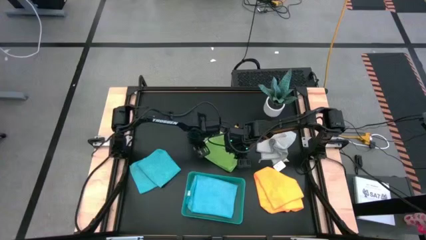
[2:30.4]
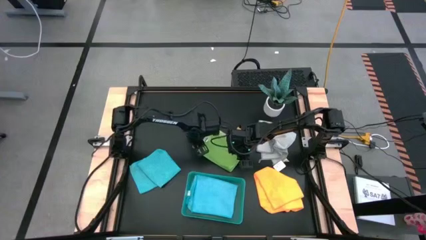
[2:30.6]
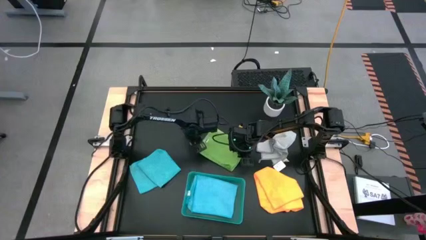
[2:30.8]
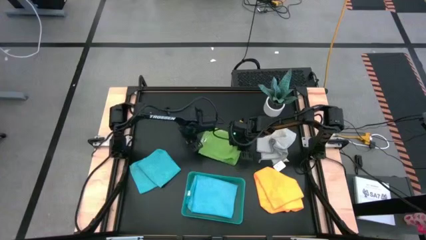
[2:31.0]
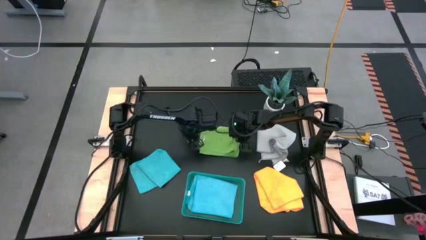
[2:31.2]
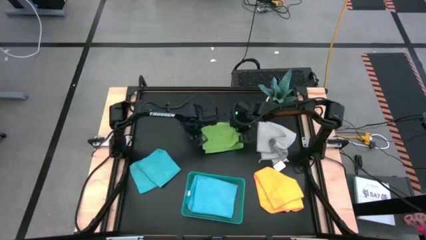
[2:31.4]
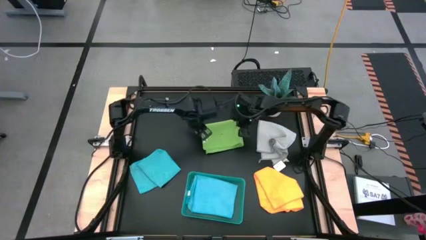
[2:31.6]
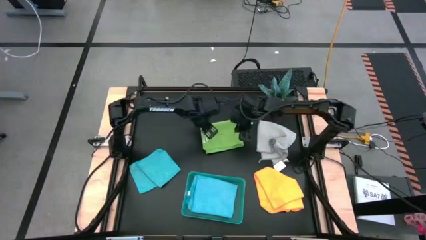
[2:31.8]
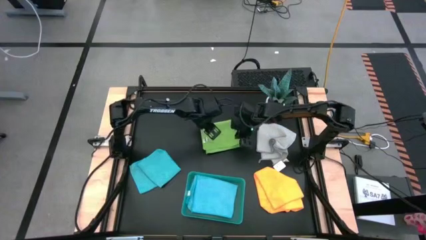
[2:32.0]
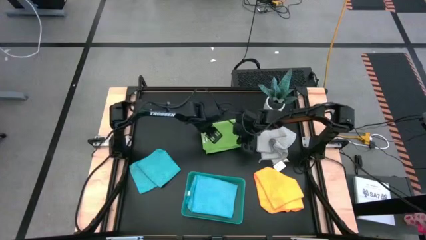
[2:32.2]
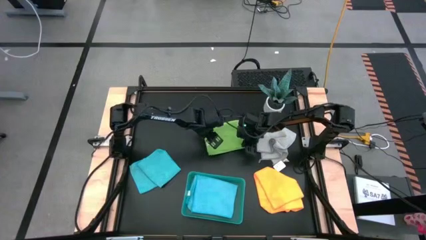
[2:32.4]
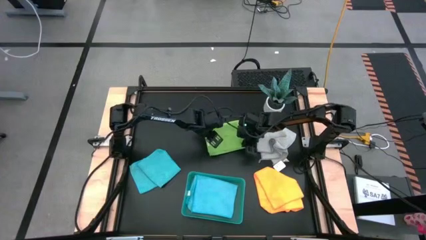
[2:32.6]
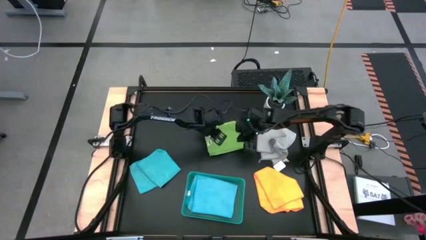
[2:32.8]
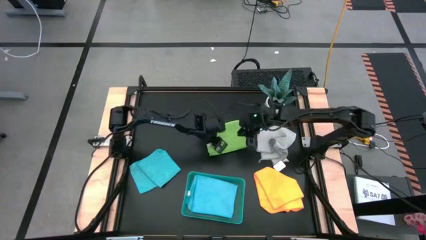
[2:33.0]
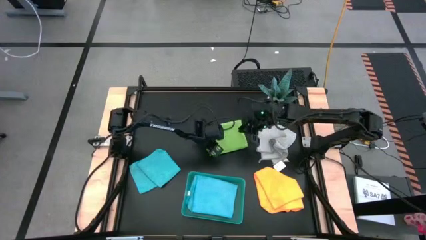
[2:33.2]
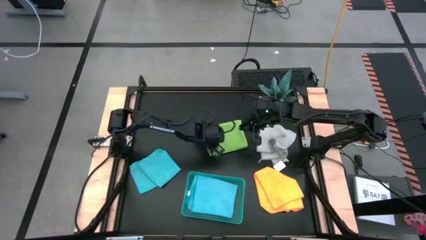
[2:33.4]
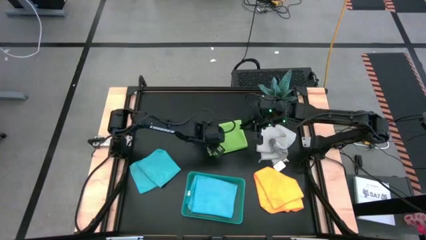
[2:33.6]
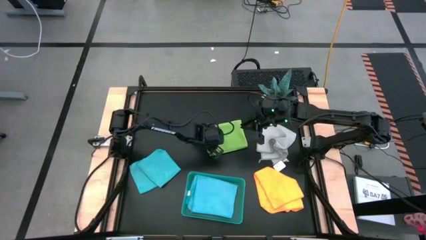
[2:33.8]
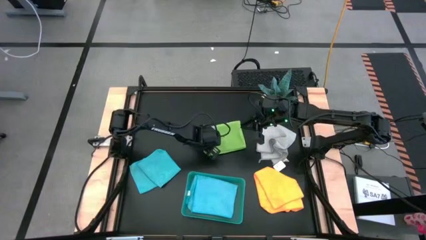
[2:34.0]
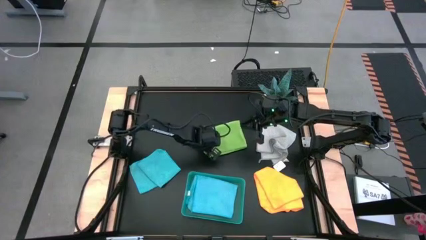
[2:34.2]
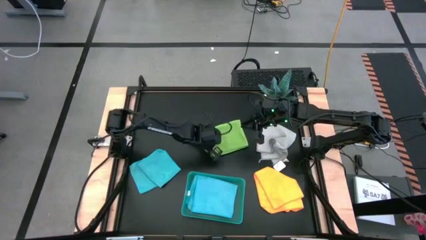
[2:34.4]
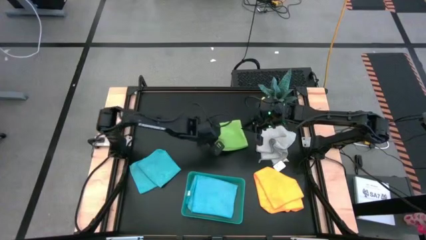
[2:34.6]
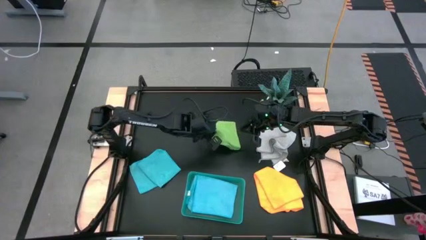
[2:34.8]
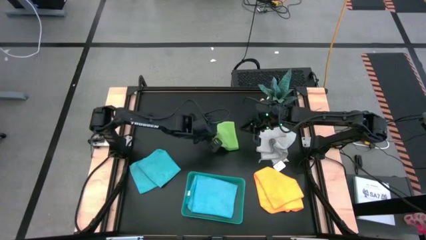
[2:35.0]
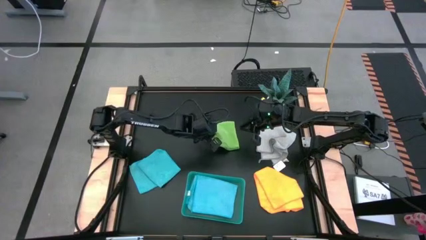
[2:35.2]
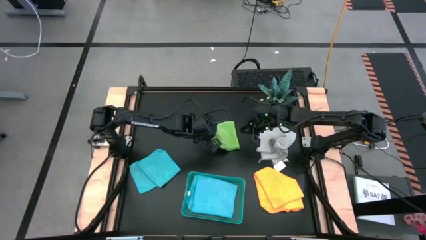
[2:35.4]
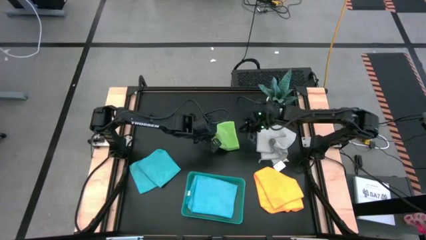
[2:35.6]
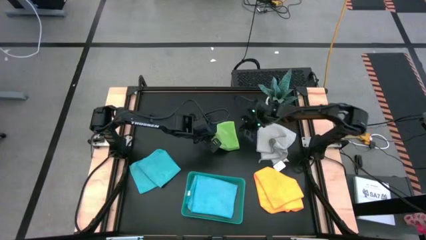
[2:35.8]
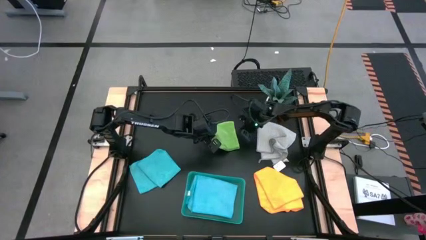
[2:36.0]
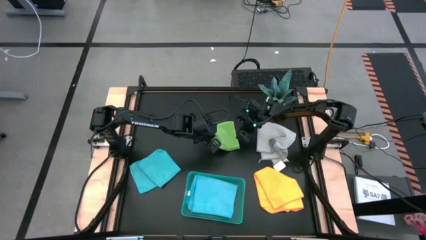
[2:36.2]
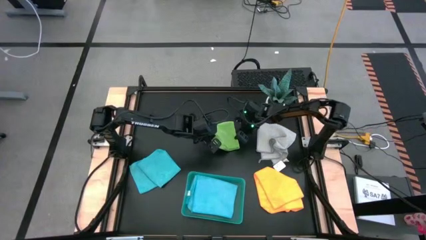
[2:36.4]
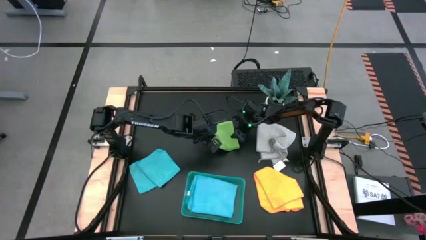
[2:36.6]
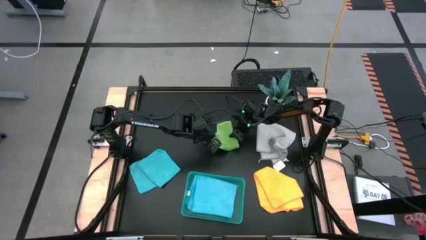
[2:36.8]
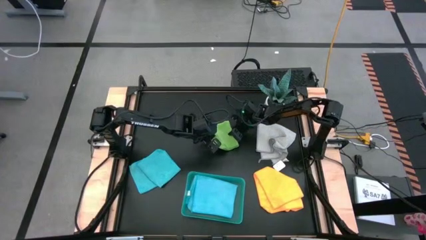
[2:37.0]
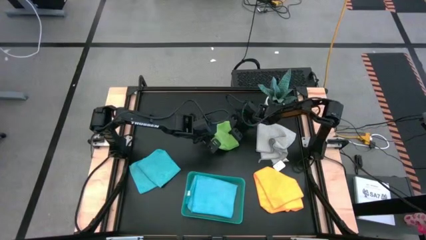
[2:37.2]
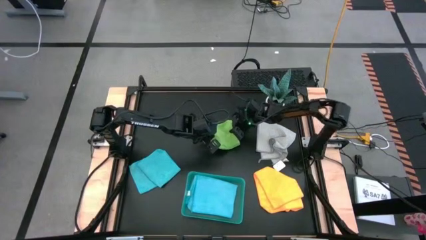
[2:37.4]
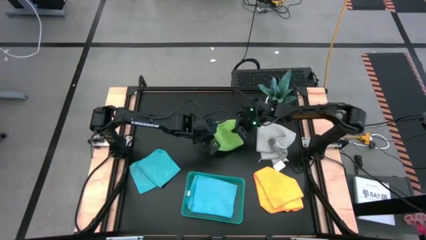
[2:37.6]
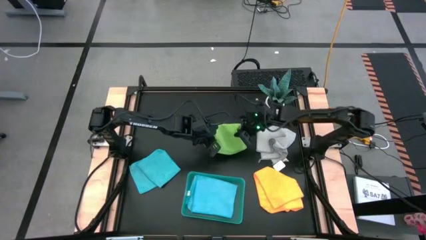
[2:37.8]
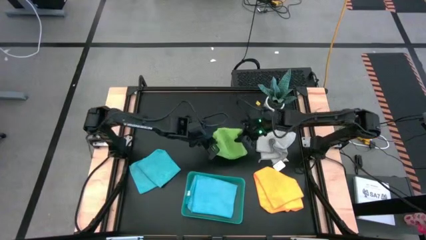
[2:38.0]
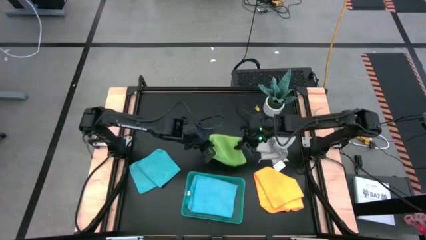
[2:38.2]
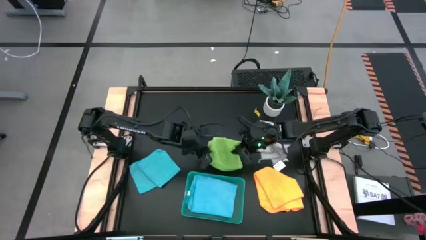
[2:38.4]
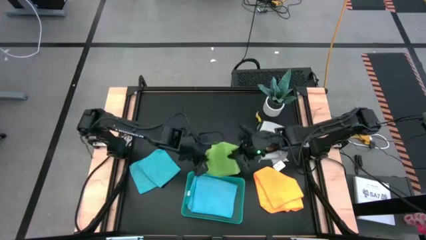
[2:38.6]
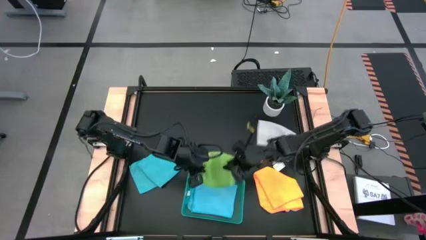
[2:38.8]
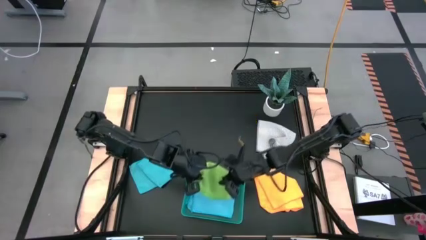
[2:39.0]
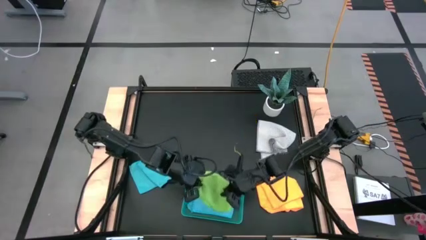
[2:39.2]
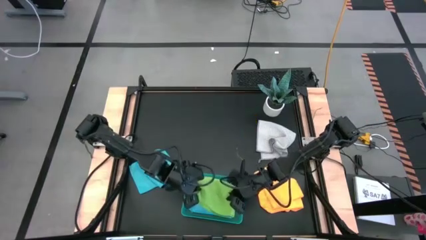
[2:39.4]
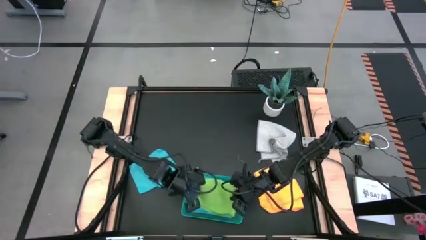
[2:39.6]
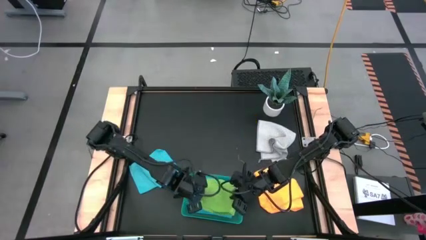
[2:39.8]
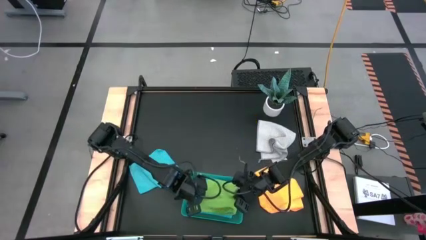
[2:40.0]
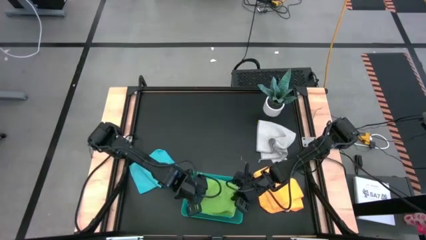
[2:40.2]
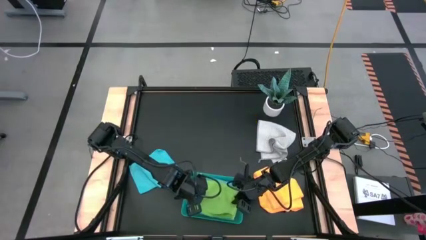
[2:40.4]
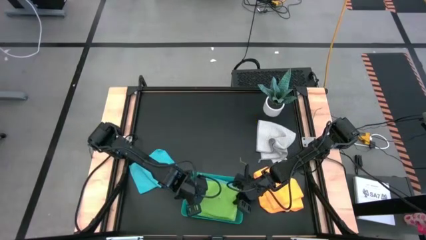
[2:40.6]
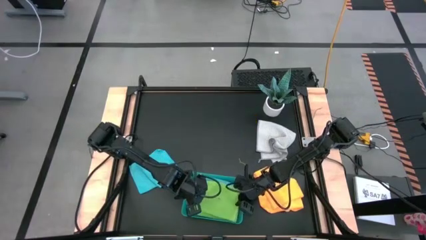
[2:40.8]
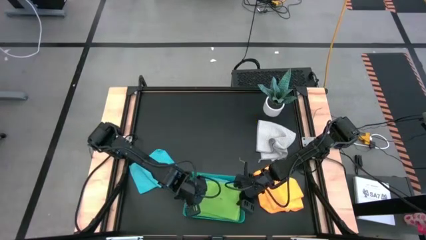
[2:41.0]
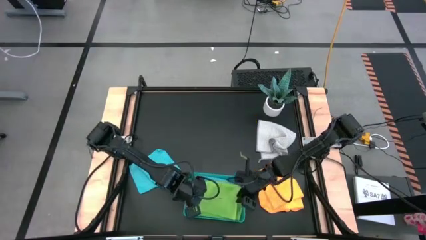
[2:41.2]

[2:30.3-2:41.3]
Task: Fold microfiber towels
Put the folded green microfiber cloth into the green transparent bin

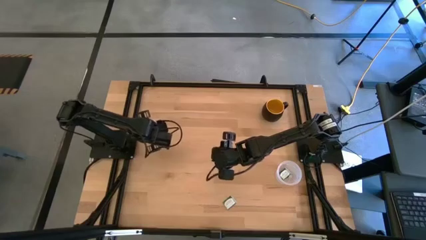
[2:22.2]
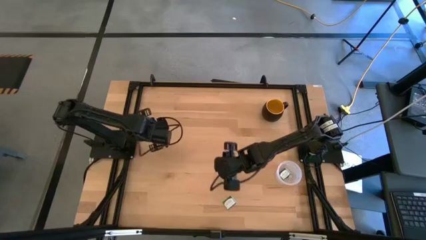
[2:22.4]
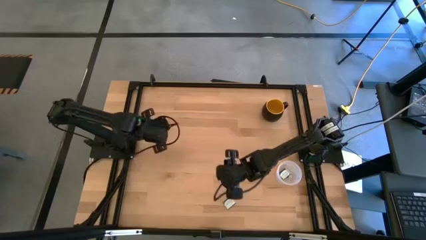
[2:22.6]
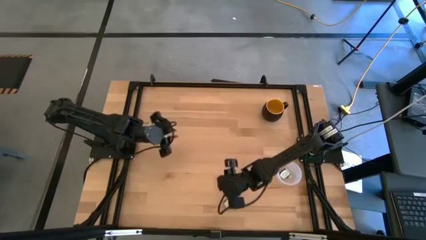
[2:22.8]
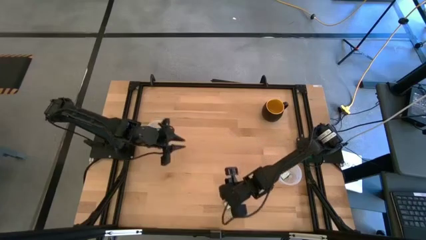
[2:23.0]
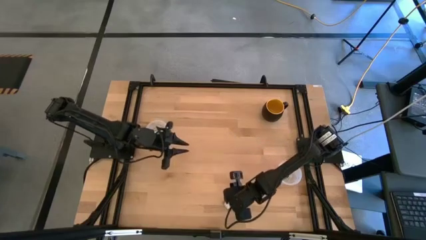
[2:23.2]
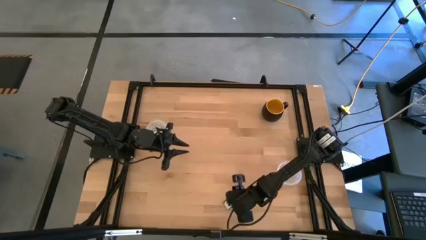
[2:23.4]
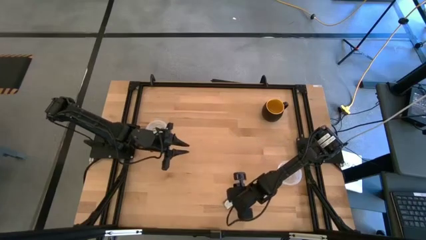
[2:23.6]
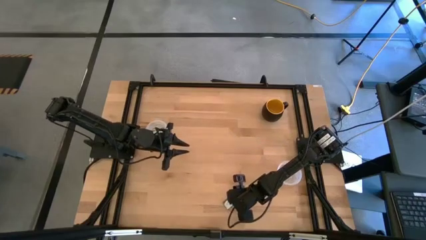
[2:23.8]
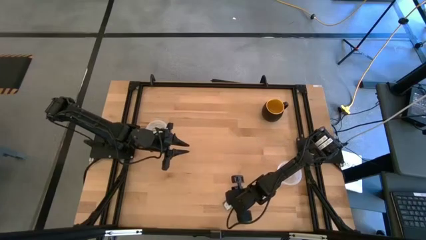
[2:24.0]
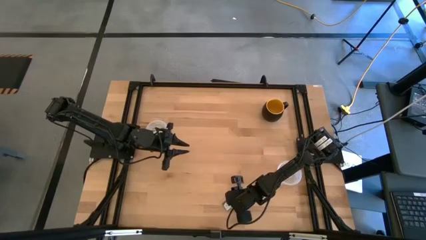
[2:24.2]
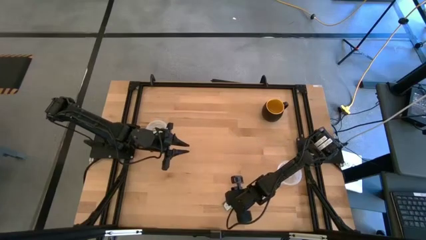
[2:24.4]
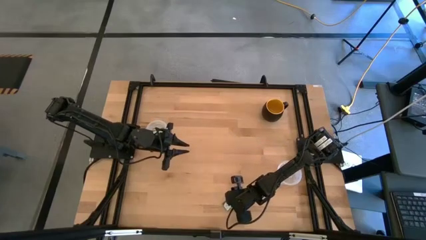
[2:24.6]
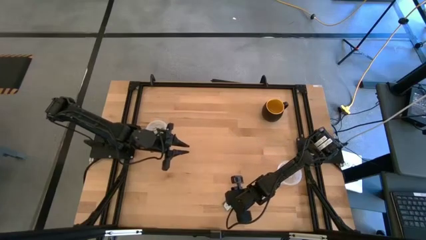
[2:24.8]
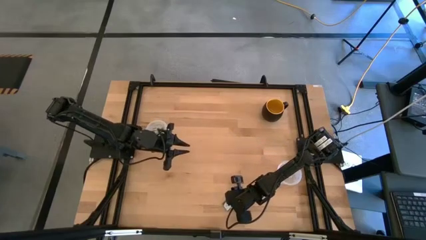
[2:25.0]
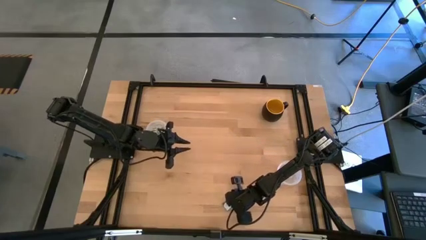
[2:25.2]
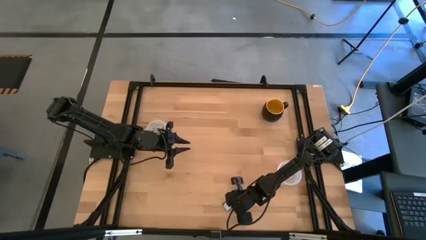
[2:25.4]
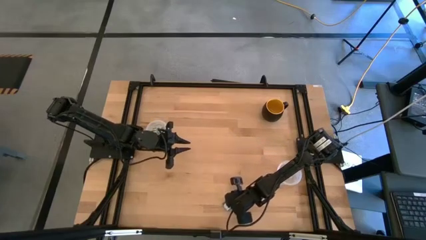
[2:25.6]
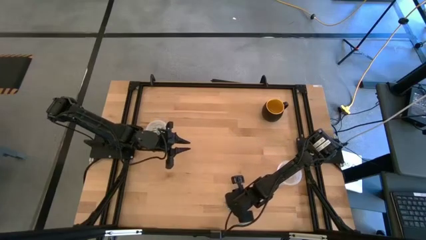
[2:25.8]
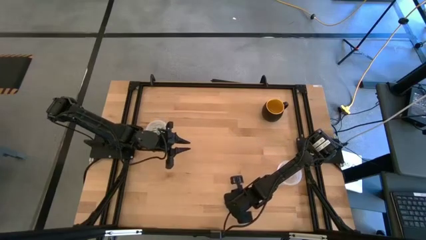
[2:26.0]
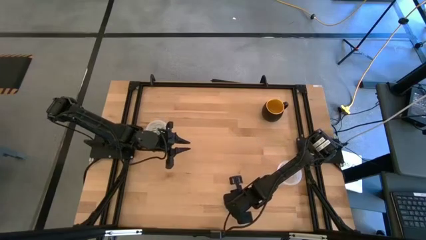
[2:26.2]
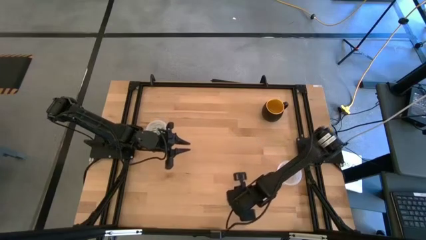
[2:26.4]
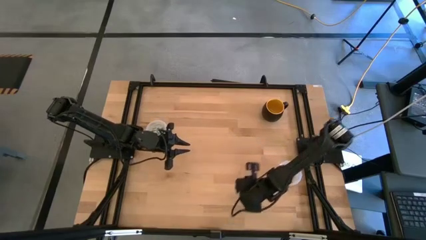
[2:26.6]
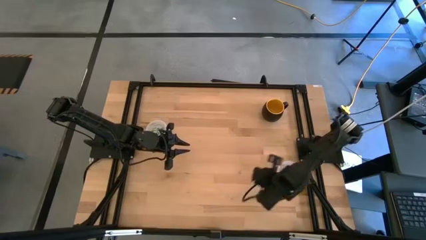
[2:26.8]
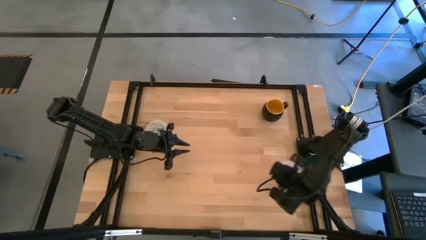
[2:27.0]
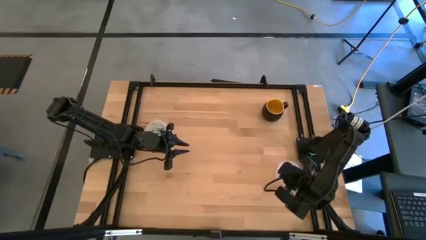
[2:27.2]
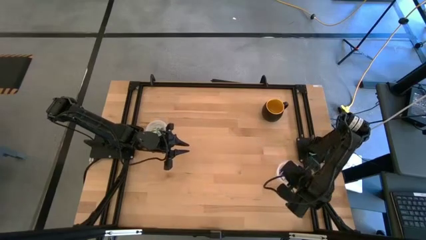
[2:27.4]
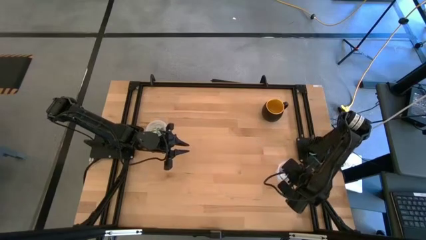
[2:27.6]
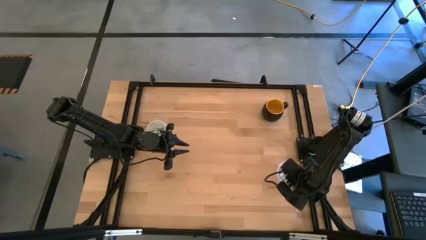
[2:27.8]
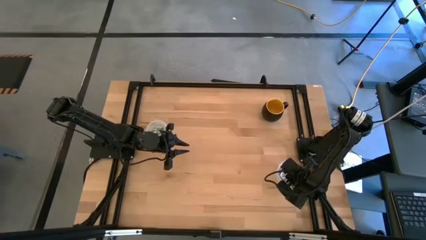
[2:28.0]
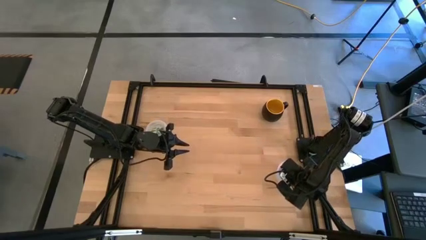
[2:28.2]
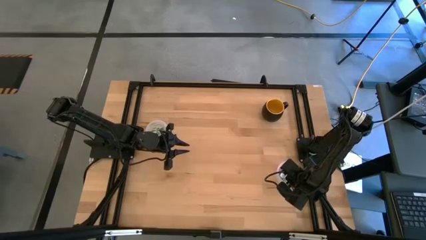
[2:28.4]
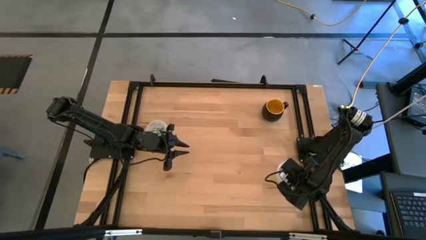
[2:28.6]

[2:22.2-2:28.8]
Task: Pick and place Stevia / Truvia into bins
Put the green stevia packet into the right transparent container
